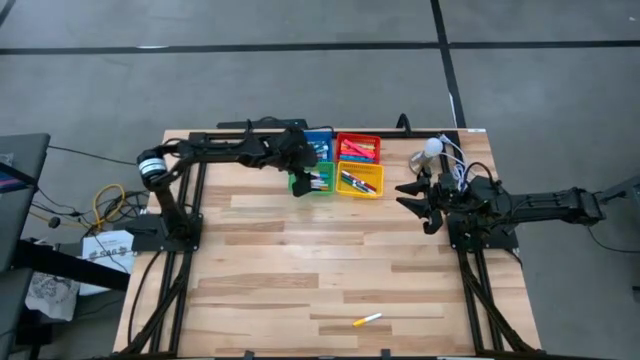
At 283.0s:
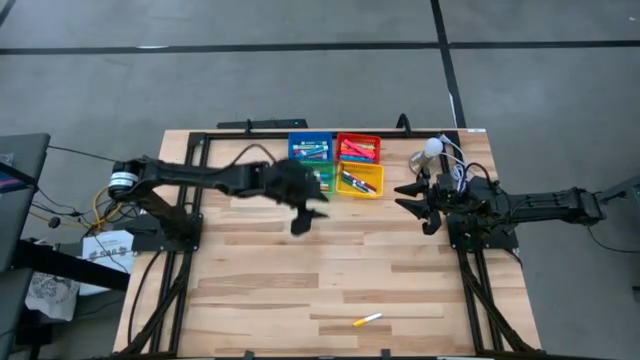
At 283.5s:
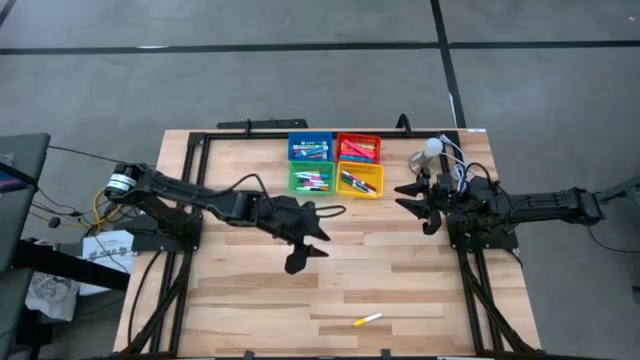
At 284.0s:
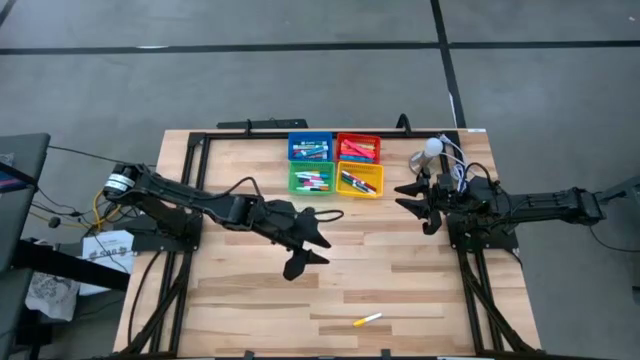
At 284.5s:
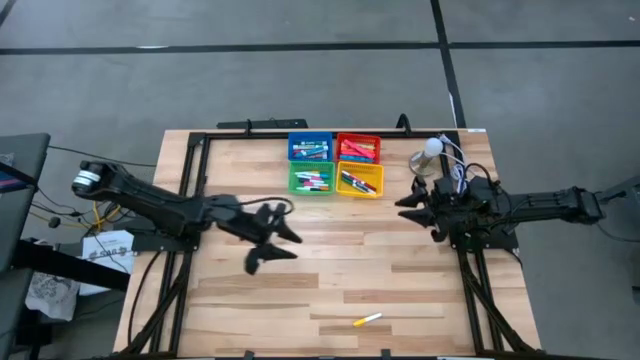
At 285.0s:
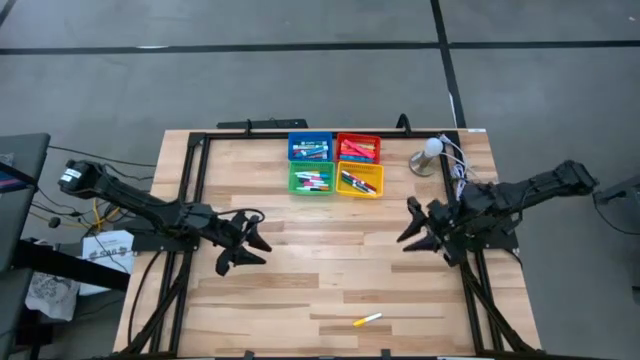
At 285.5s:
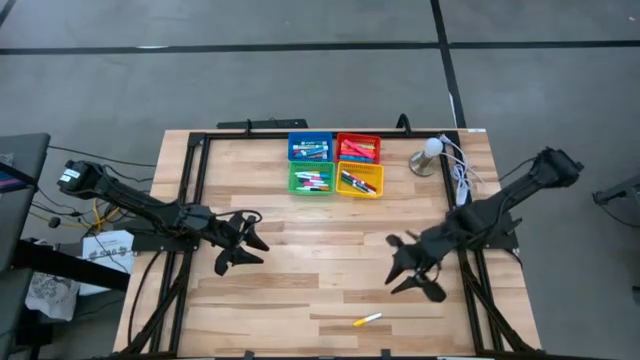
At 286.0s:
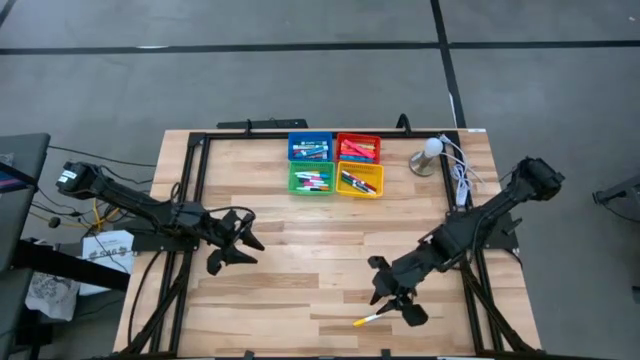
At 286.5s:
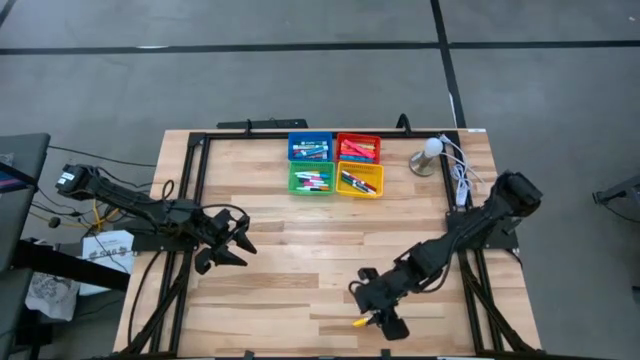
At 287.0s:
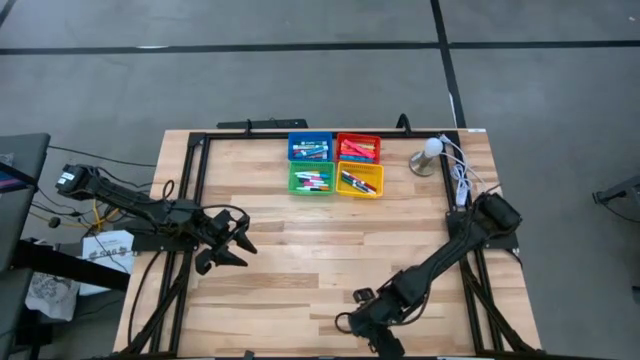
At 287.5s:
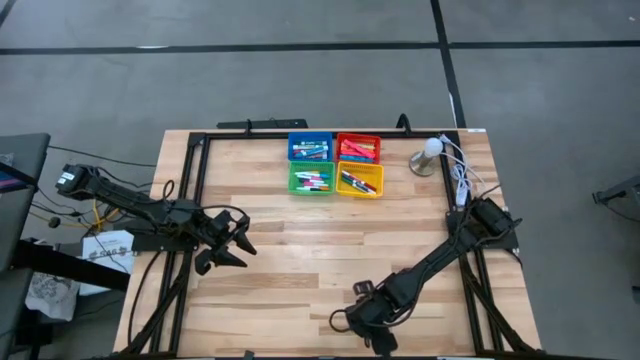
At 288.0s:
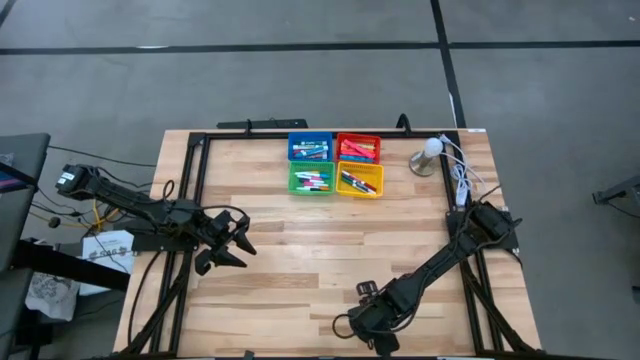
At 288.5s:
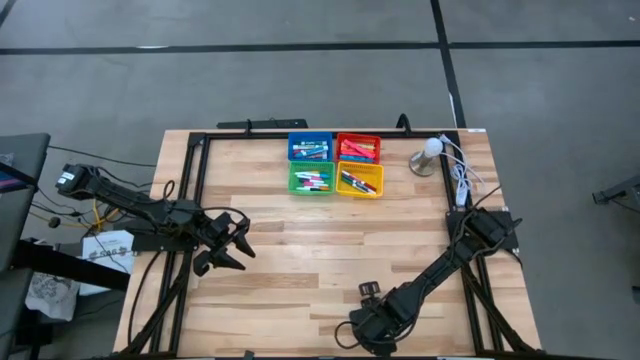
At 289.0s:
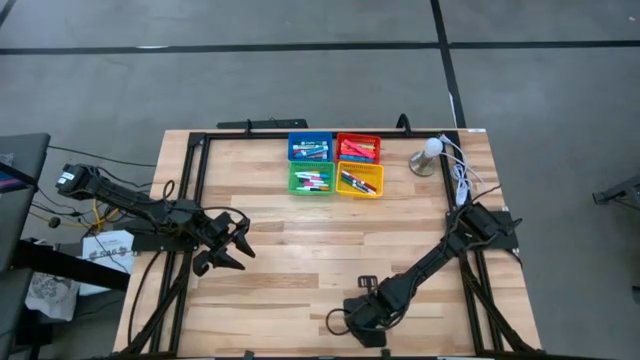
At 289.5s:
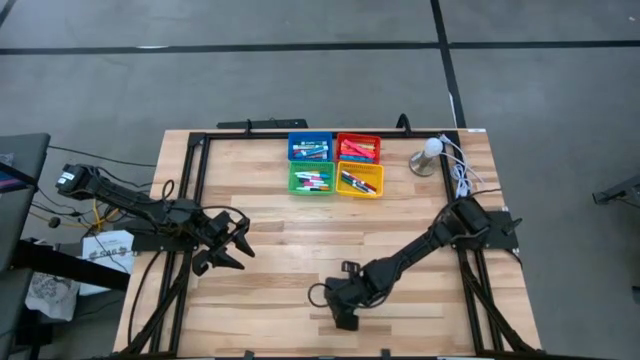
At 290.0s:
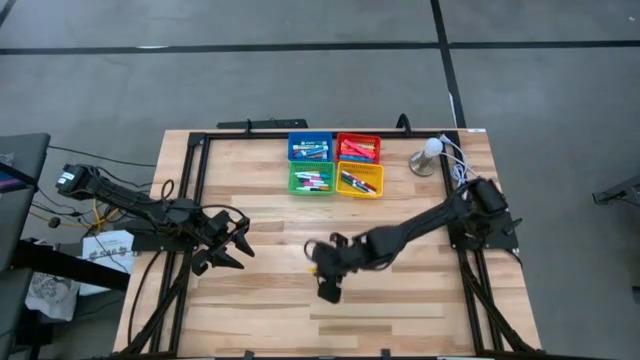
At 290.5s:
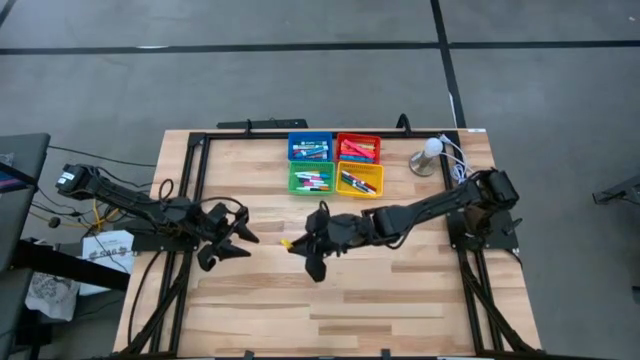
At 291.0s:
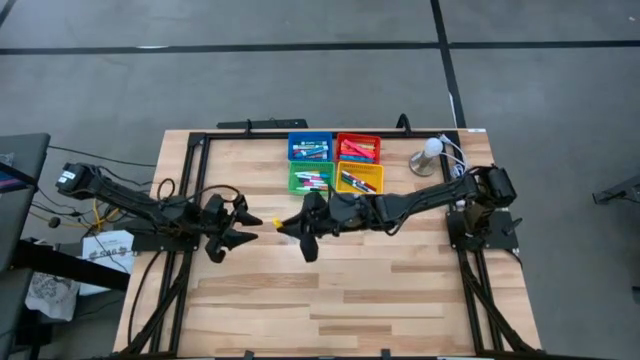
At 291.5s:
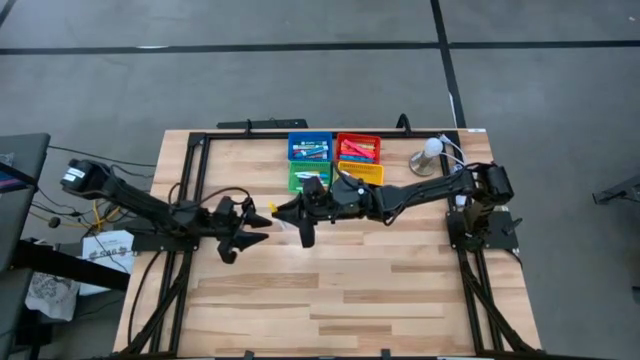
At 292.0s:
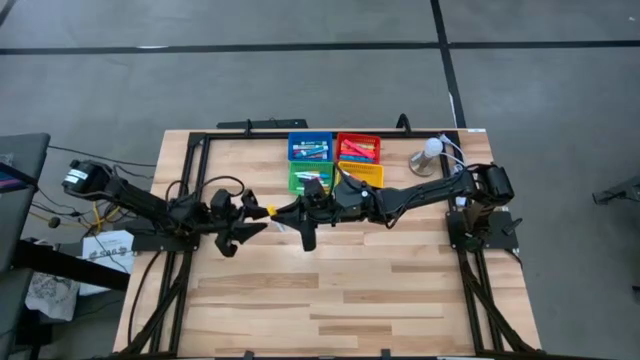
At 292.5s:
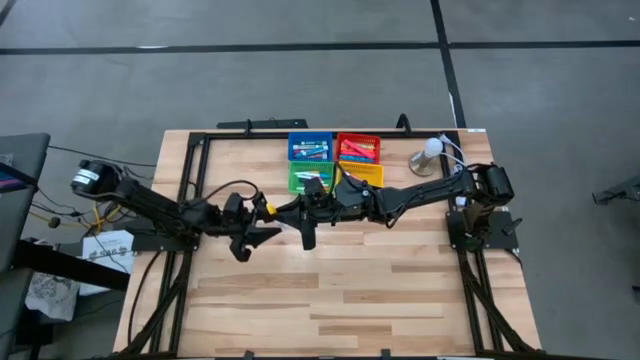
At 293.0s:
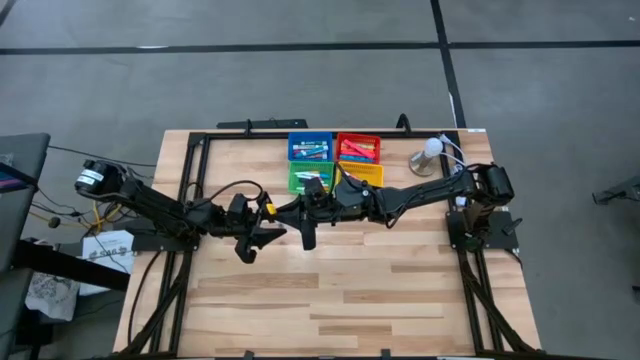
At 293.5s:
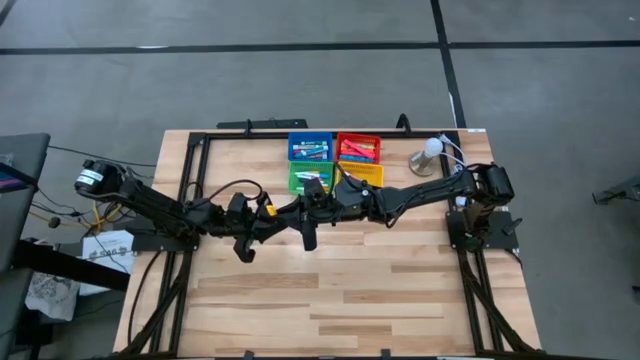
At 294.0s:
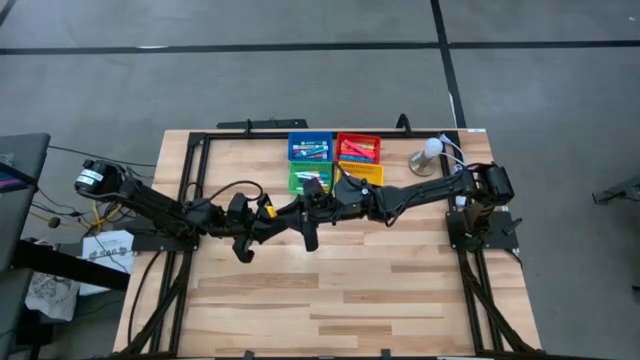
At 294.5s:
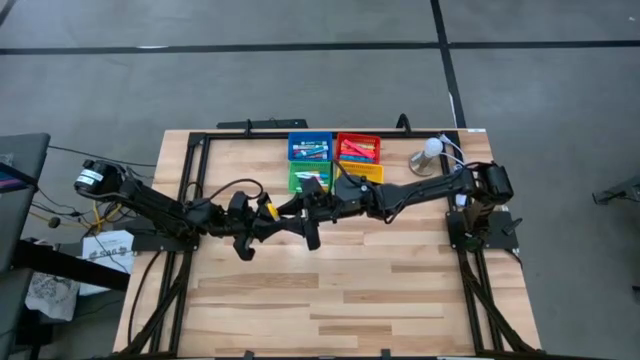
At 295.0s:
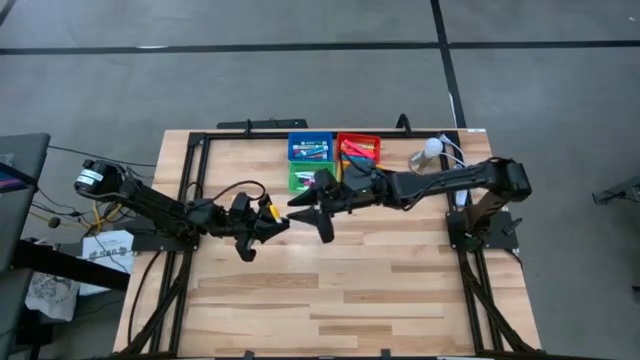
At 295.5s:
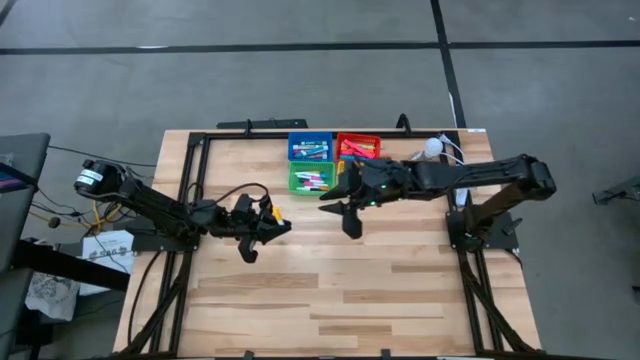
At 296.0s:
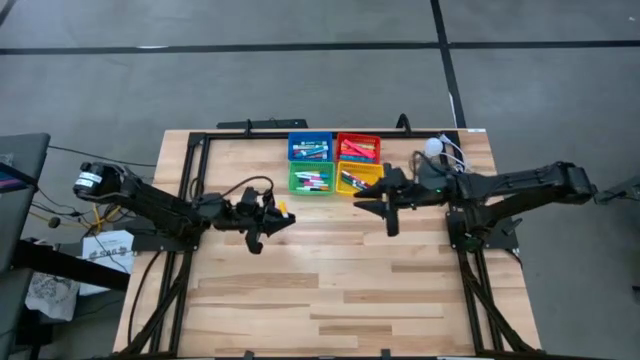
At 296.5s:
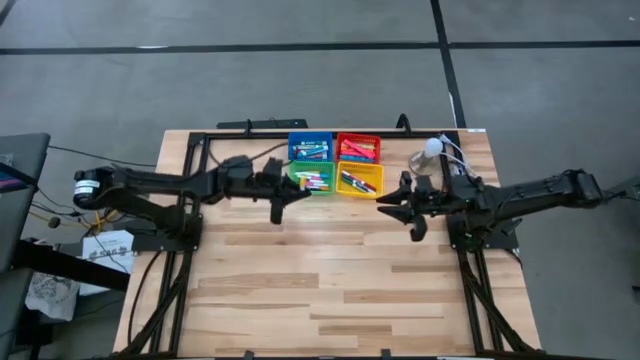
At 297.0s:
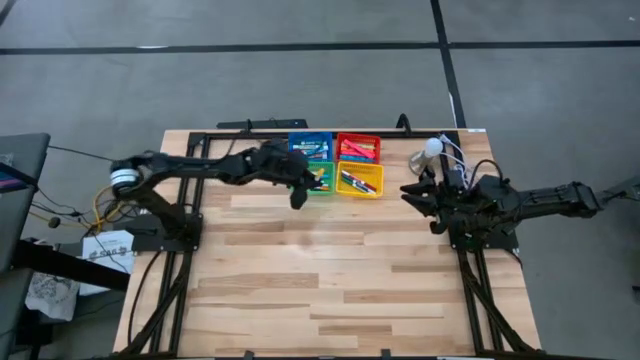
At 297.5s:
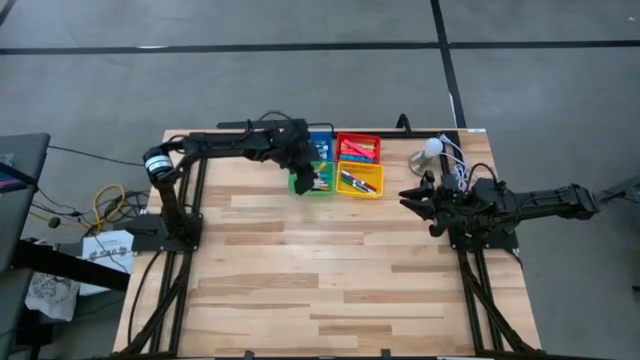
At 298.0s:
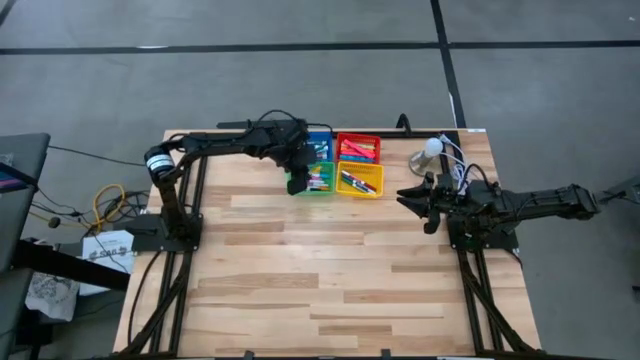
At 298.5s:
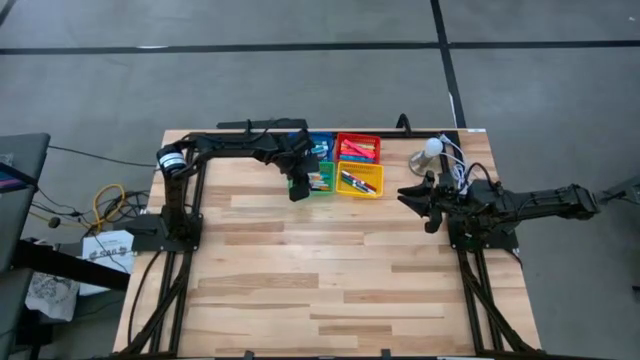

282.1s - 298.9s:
Task: Pick & Place Markers
Put the yellow highlighter in the green bin
